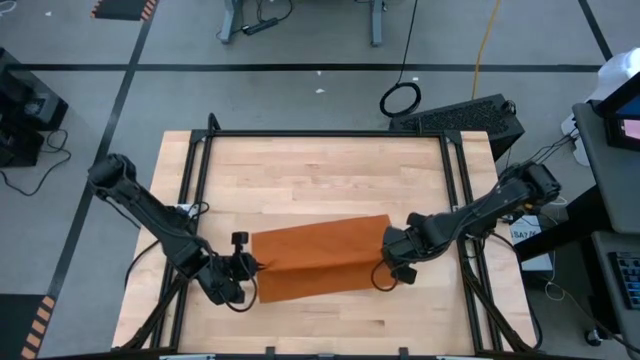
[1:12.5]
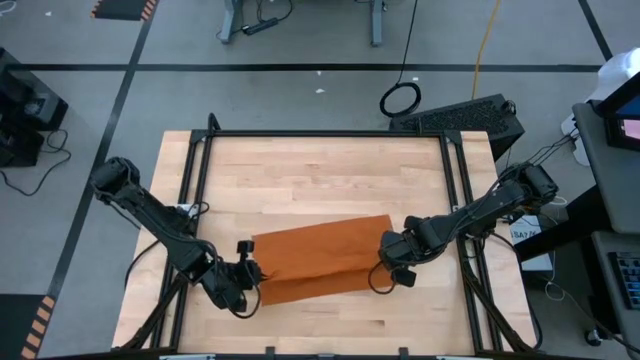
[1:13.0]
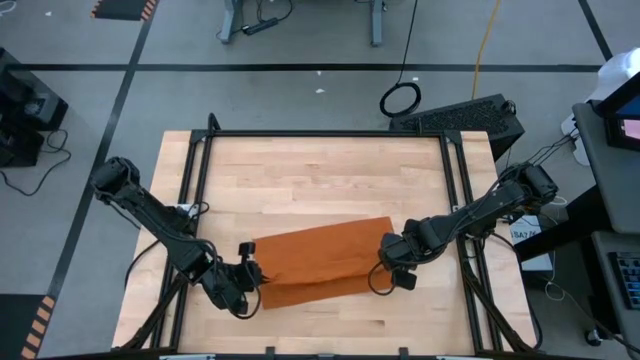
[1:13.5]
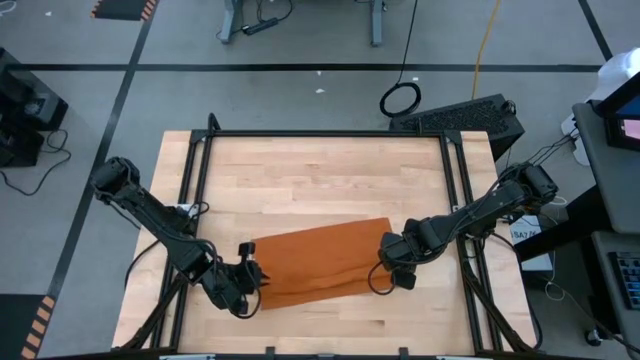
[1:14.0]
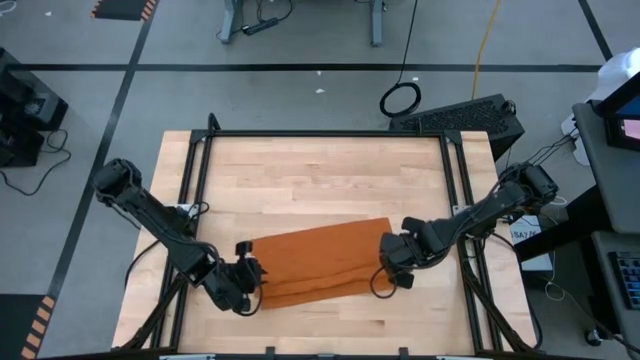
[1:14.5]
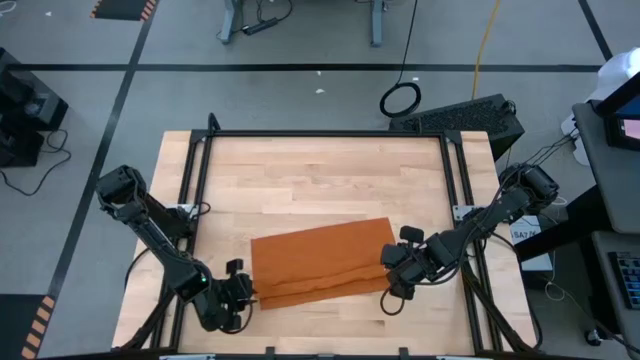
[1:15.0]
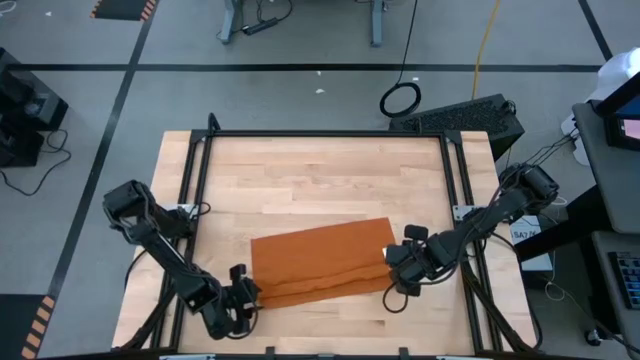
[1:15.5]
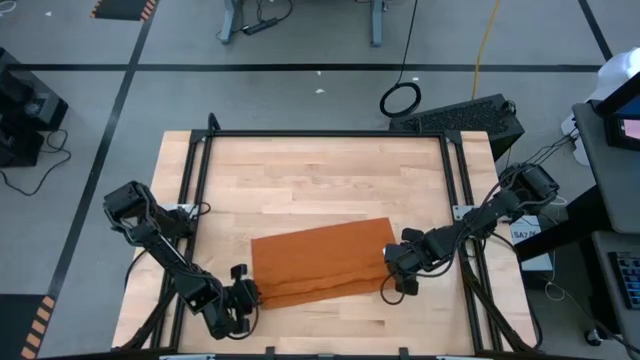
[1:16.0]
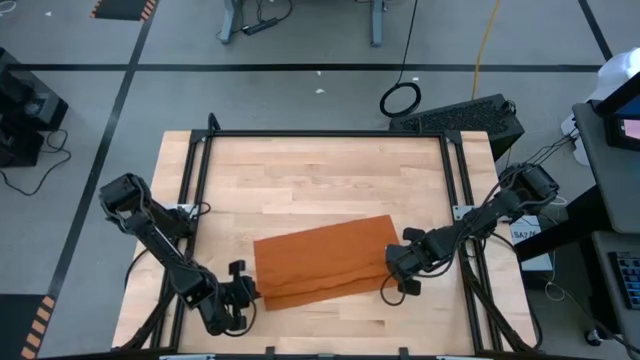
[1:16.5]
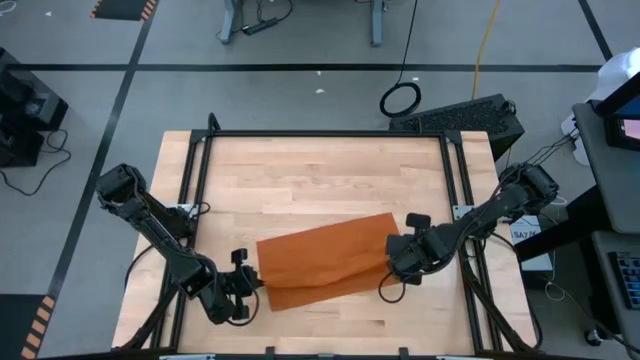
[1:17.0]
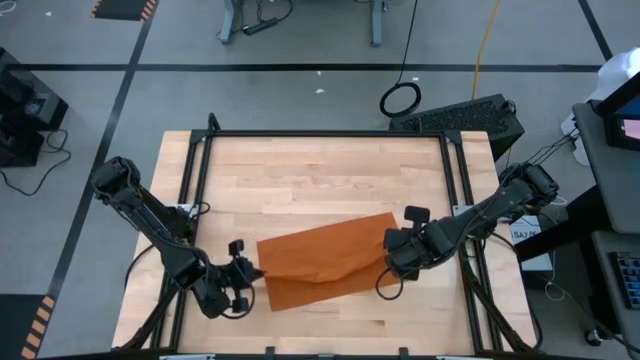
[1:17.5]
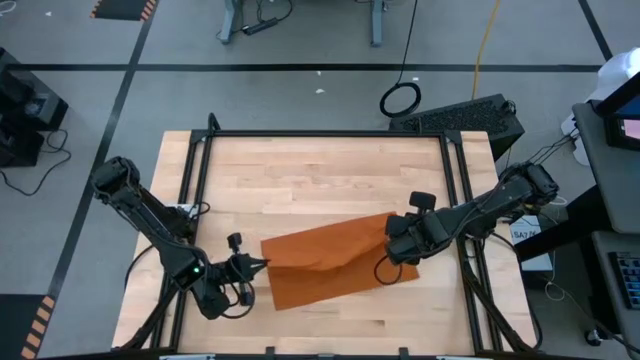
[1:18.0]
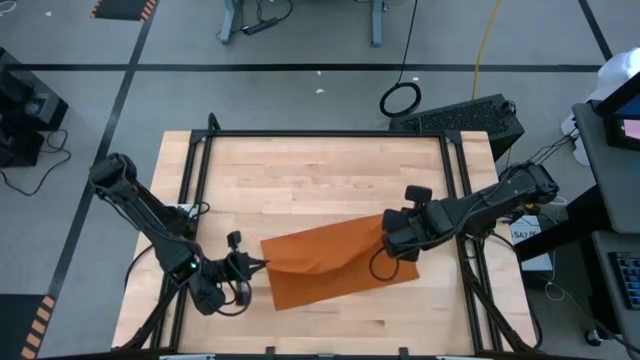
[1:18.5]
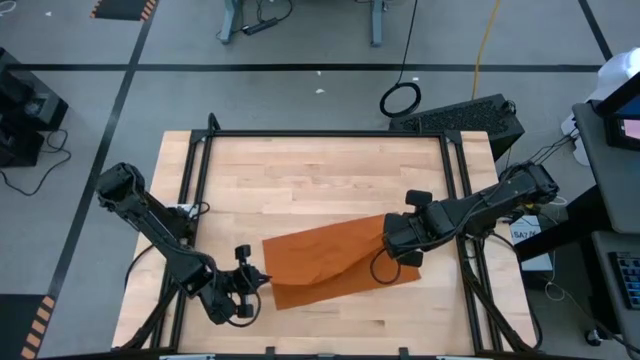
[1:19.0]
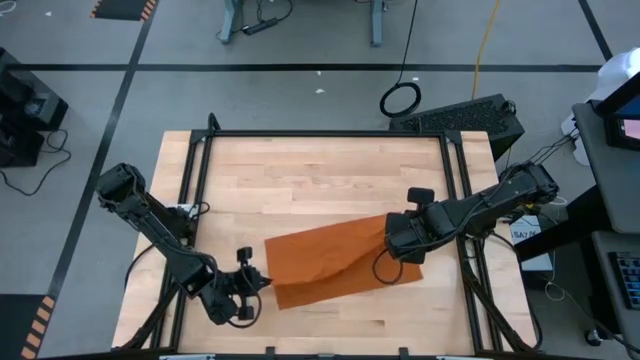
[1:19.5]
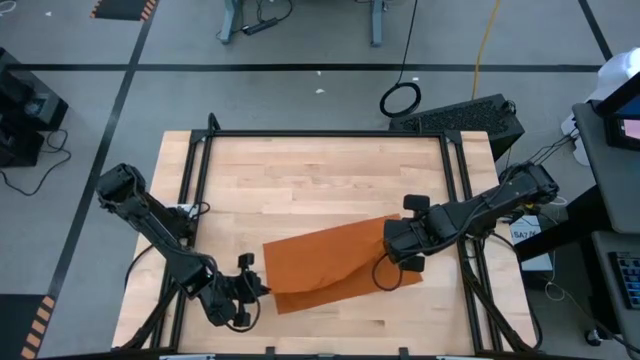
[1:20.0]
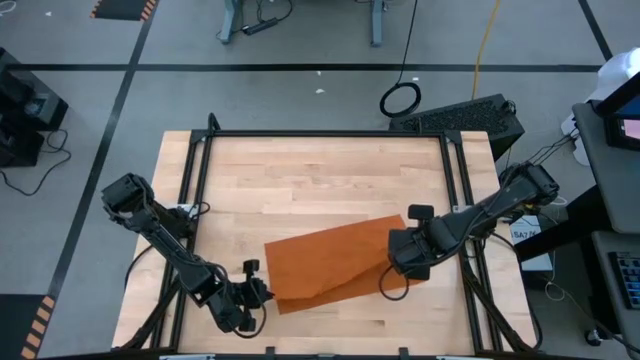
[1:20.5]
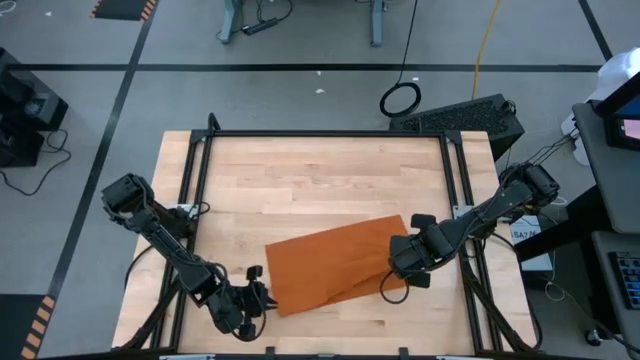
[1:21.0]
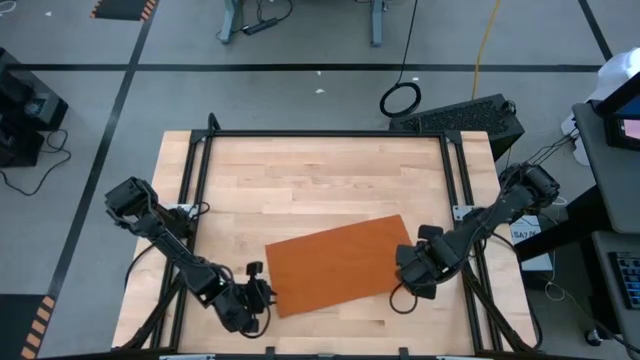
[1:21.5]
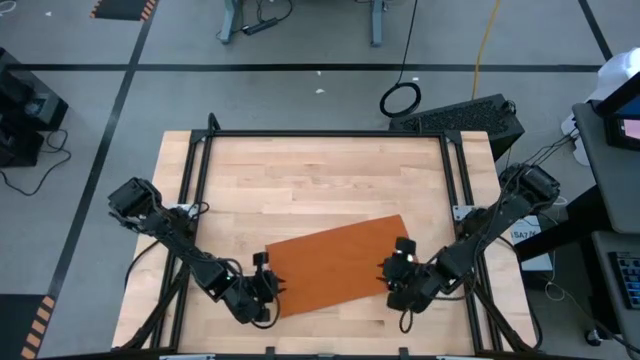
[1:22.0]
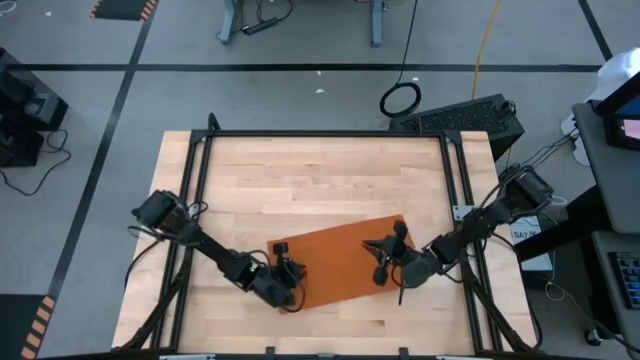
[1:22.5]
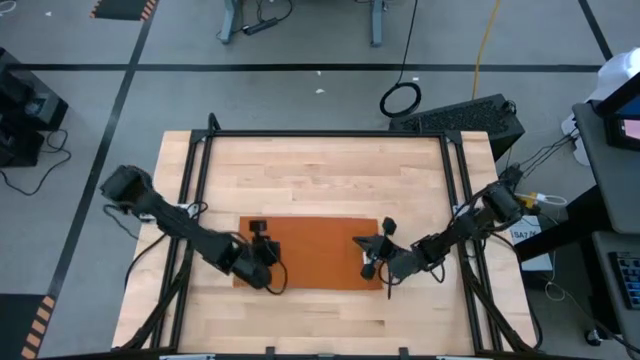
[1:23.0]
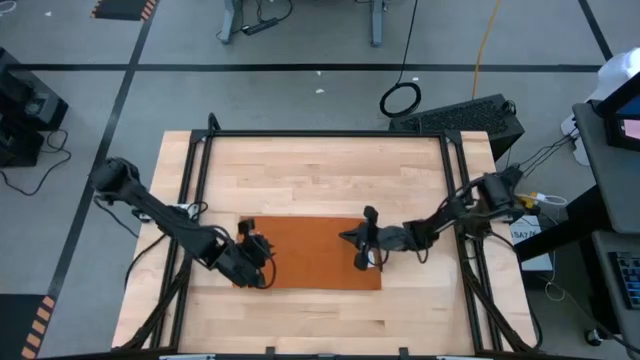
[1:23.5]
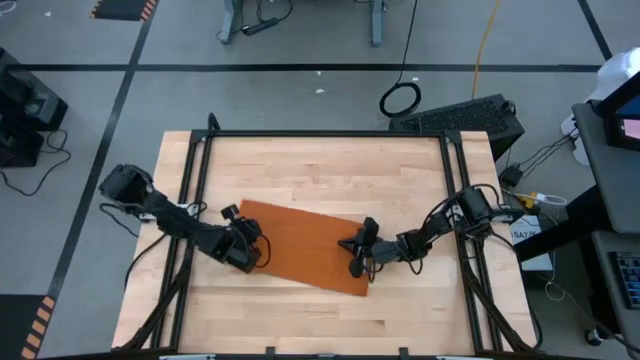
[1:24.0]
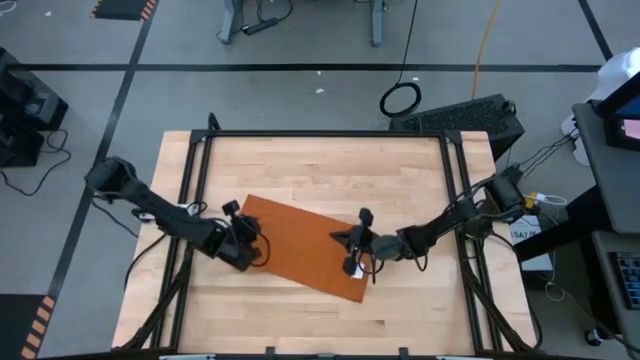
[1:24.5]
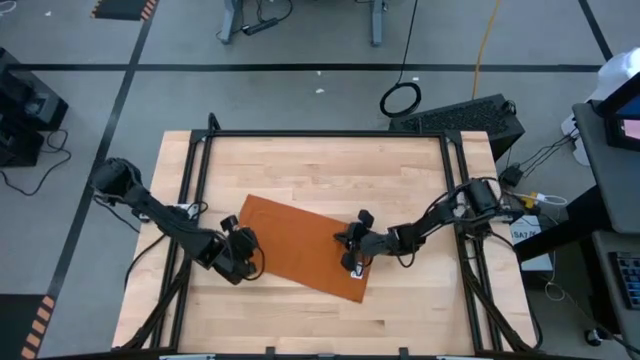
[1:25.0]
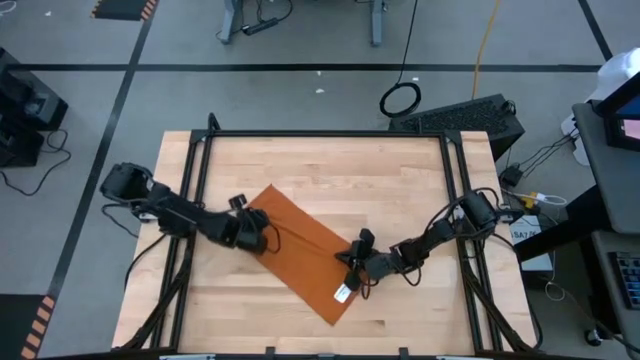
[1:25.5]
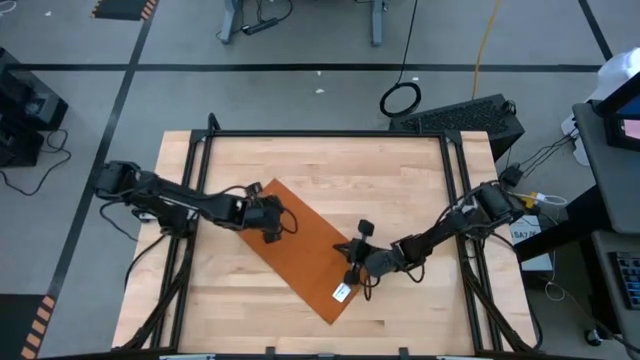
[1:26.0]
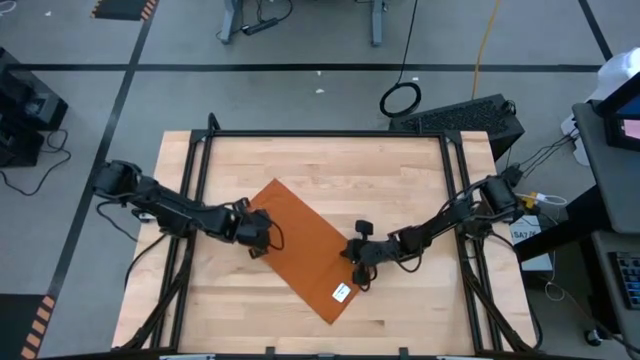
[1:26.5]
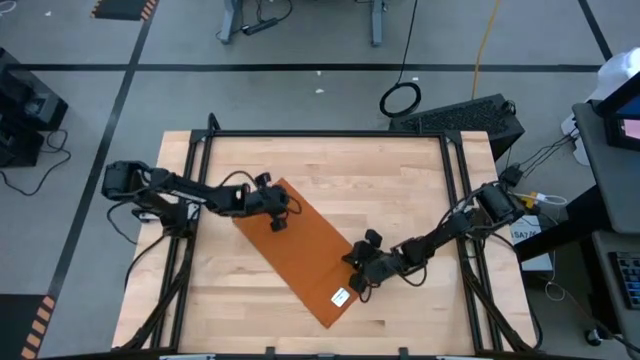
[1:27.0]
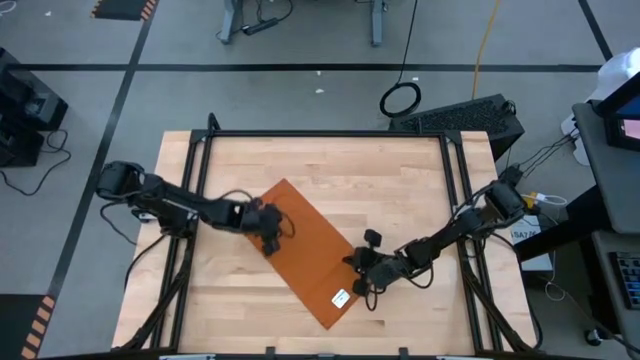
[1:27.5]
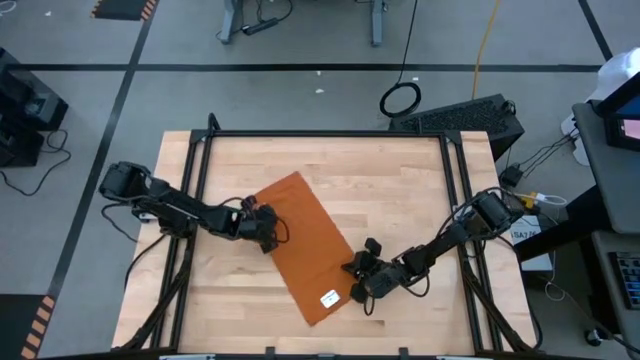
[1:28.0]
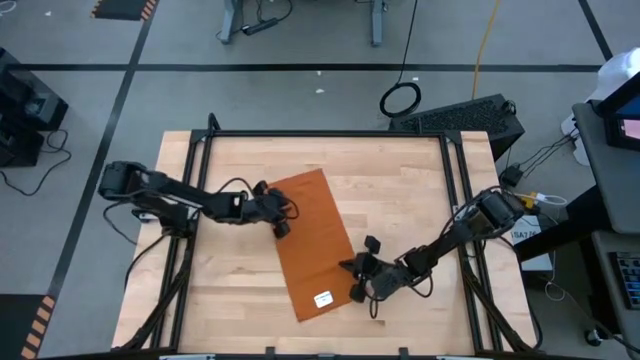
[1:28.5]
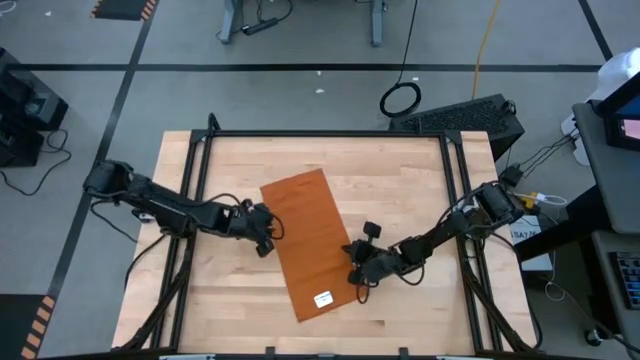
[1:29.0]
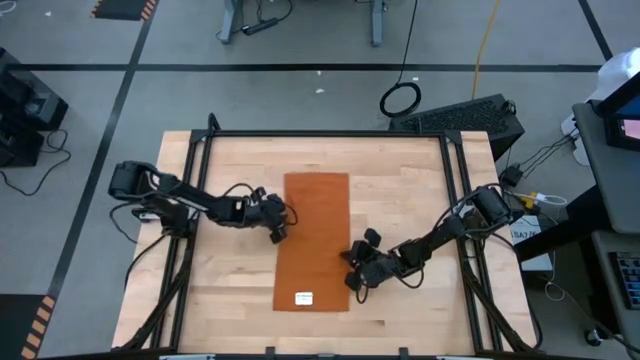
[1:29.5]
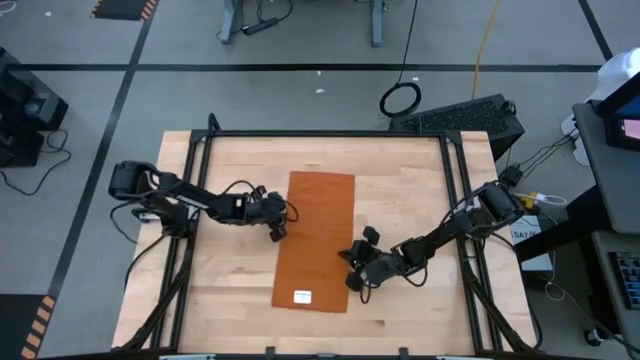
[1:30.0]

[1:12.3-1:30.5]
Task: Roll towel into tight, uniform cylinder
Fold the brown towel

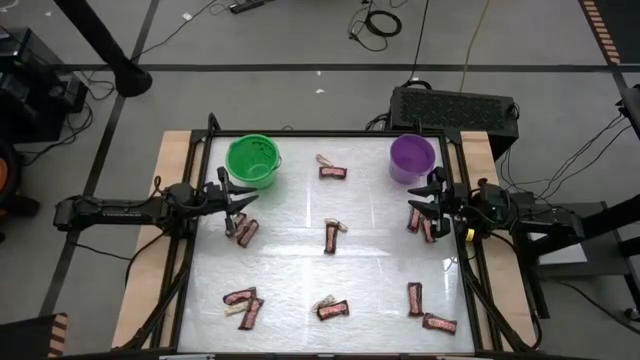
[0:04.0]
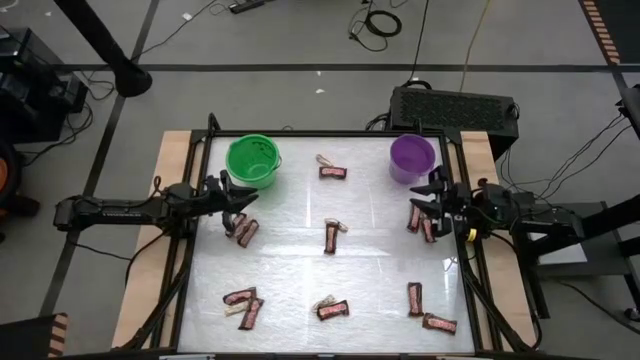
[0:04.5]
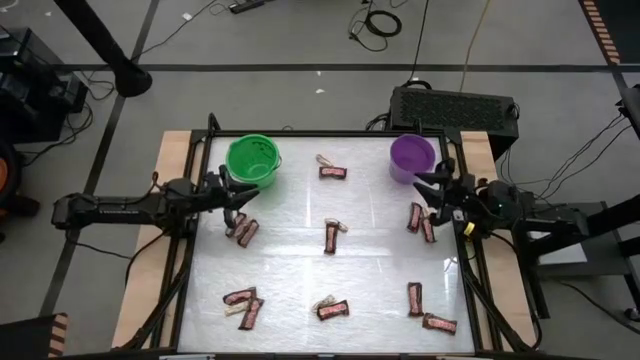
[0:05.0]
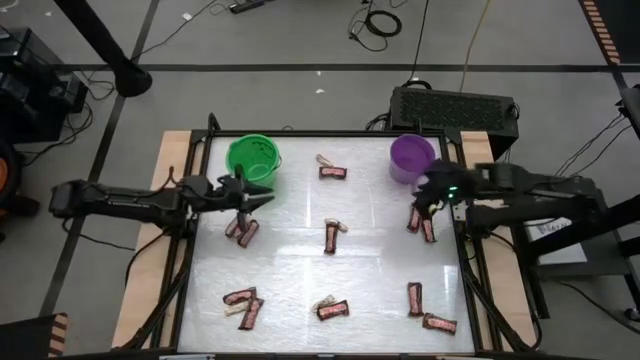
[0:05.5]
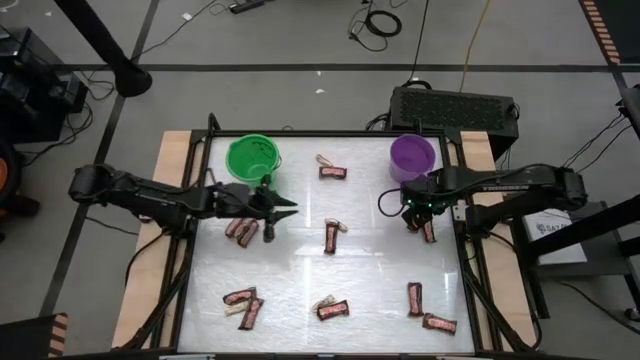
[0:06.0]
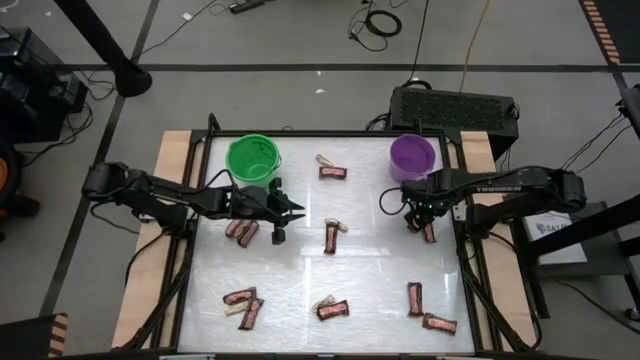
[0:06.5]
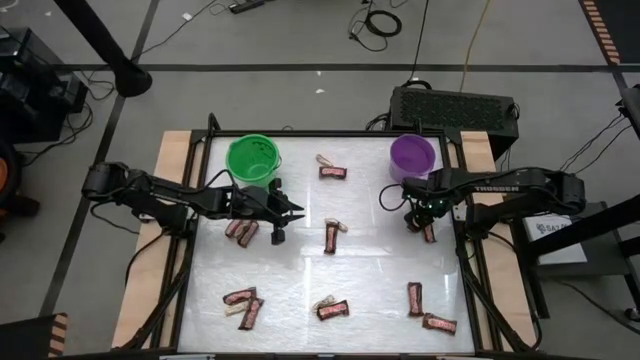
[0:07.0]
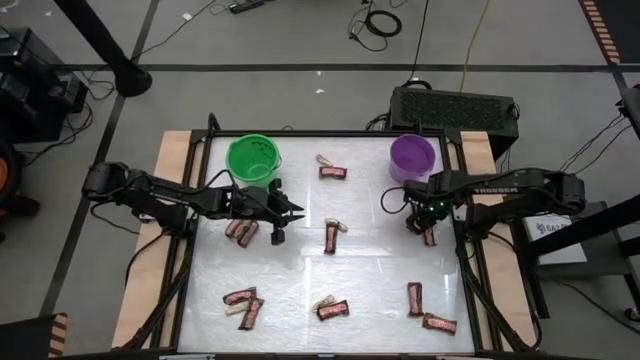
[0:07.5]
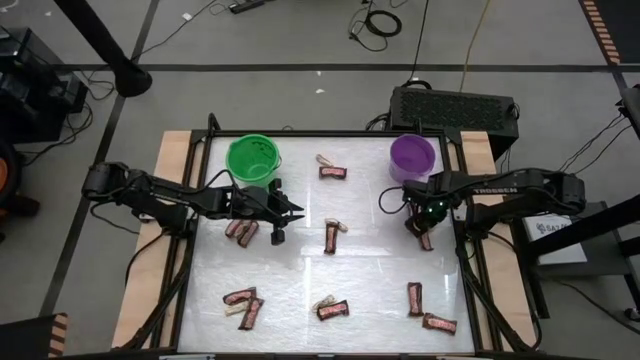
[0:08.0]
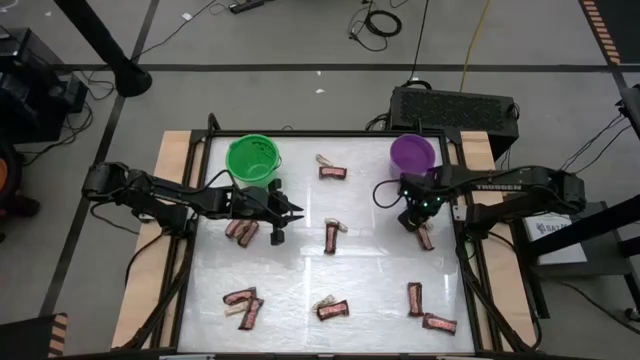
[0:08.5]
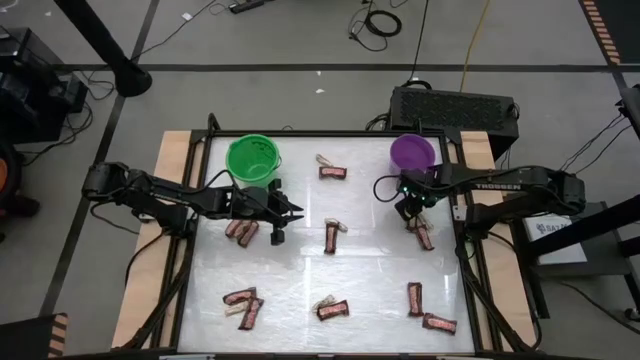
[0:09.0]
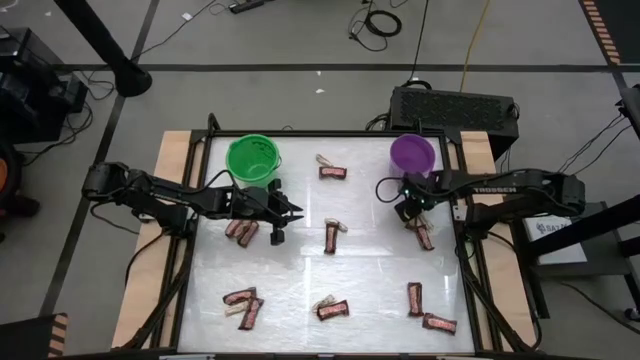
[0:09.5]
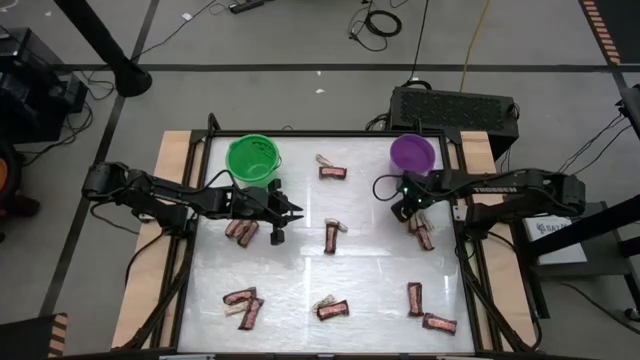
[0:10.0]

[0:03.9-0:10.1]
Task: Sort candy by brand, put in halloween buckets
Put the brown chocolate bar into the purple bucket
